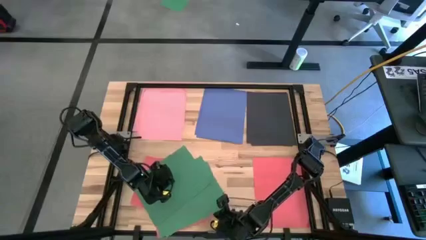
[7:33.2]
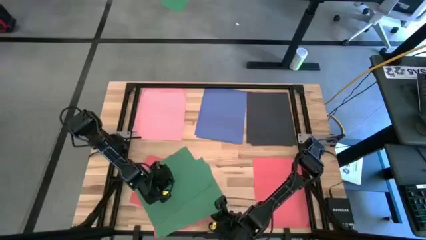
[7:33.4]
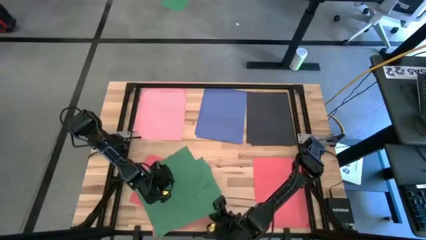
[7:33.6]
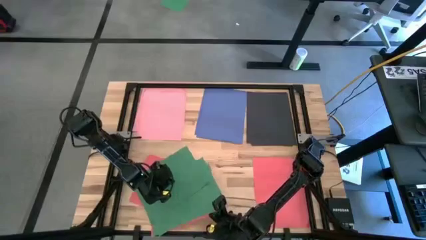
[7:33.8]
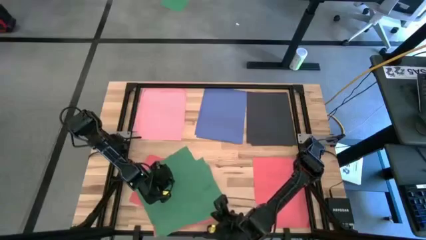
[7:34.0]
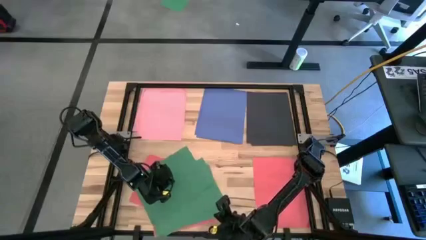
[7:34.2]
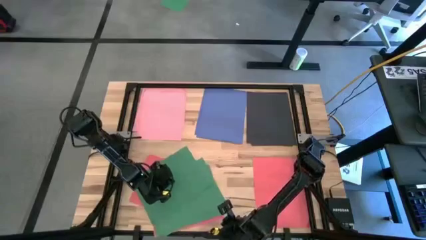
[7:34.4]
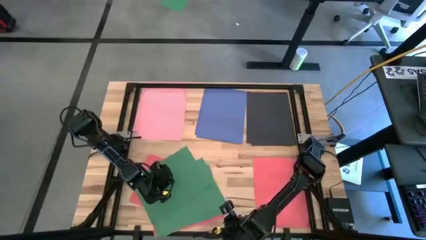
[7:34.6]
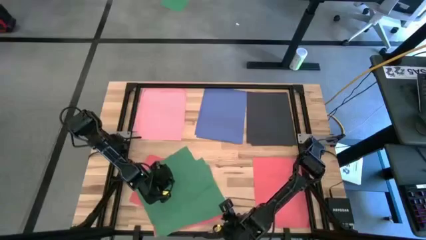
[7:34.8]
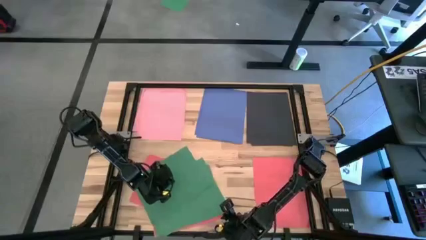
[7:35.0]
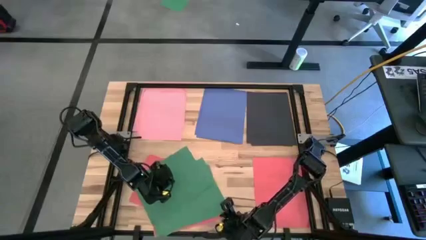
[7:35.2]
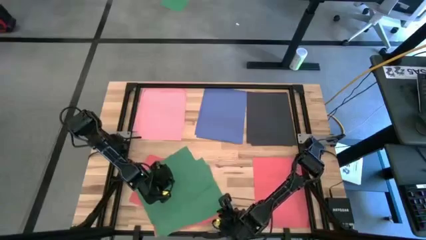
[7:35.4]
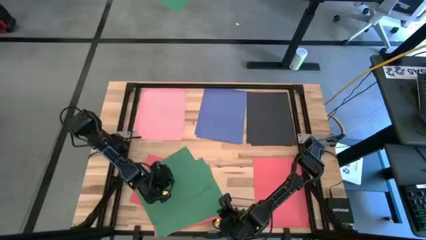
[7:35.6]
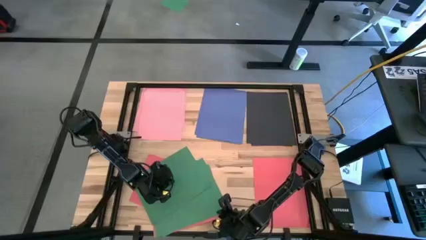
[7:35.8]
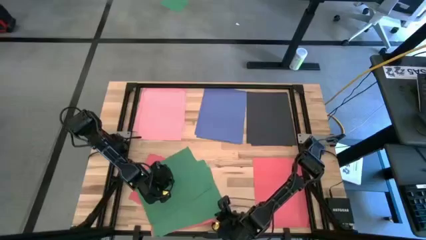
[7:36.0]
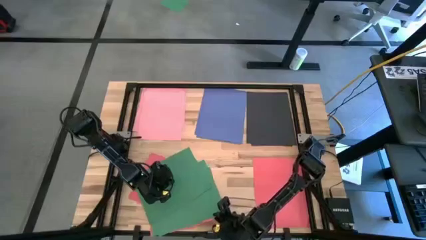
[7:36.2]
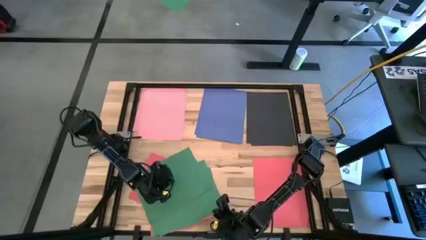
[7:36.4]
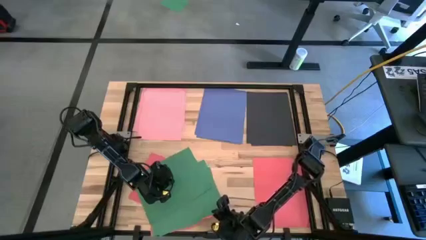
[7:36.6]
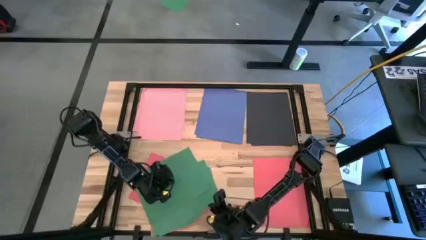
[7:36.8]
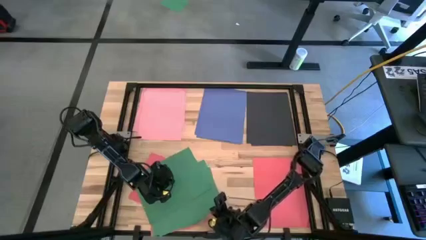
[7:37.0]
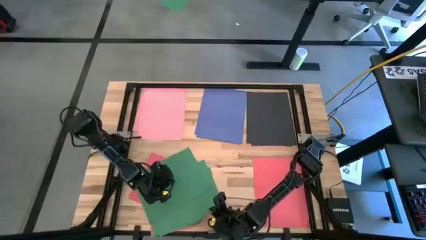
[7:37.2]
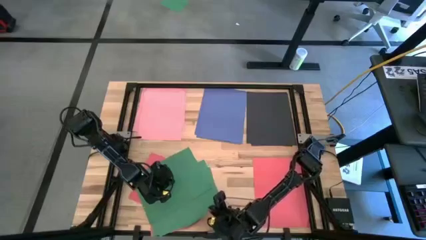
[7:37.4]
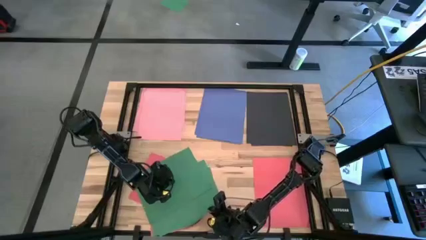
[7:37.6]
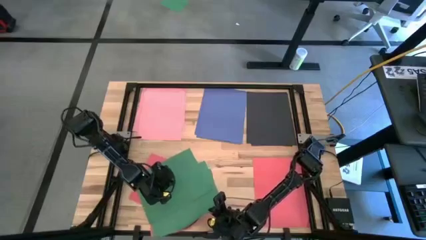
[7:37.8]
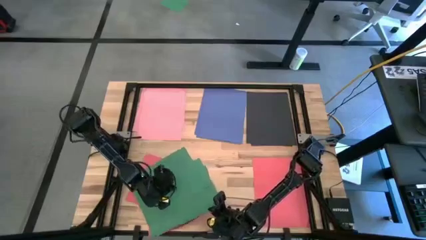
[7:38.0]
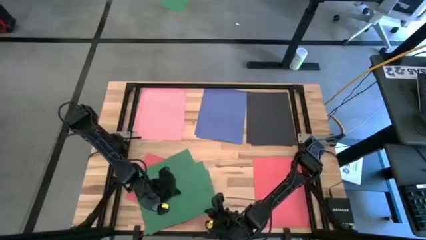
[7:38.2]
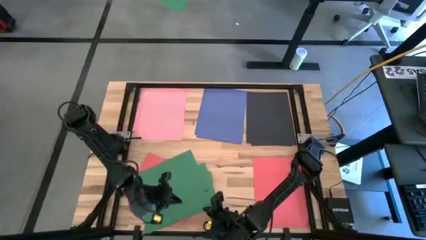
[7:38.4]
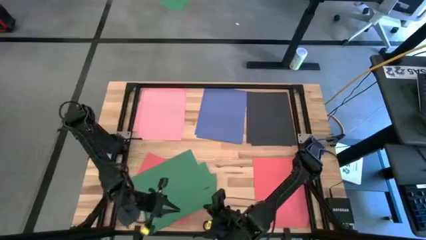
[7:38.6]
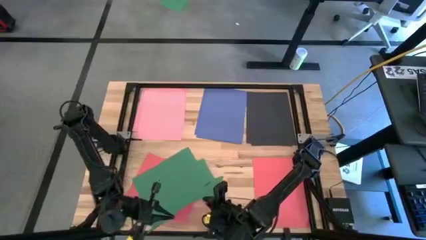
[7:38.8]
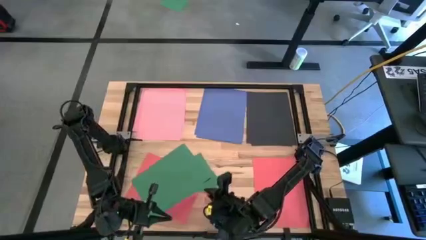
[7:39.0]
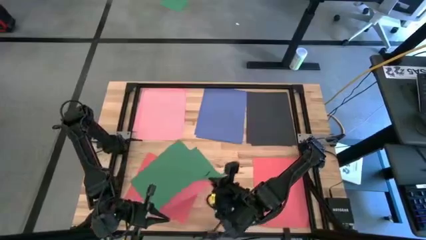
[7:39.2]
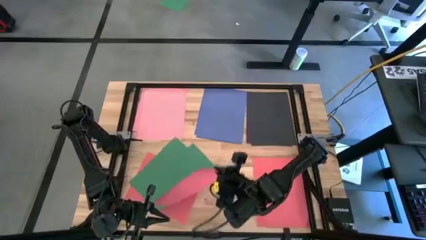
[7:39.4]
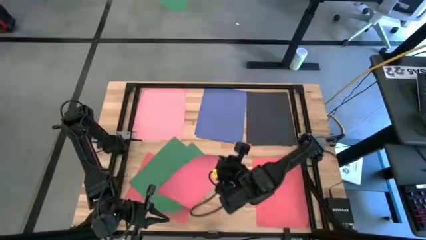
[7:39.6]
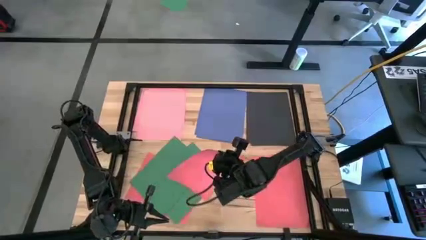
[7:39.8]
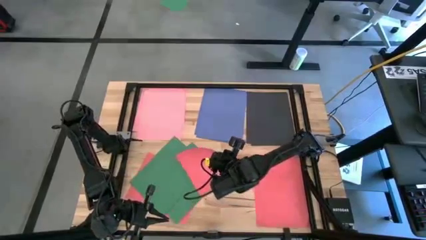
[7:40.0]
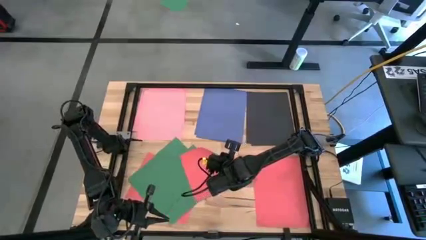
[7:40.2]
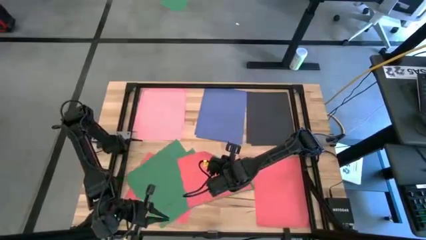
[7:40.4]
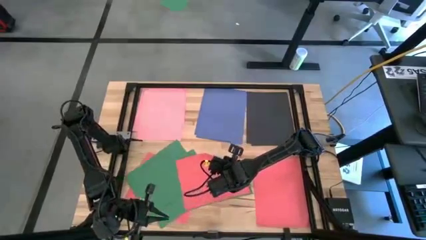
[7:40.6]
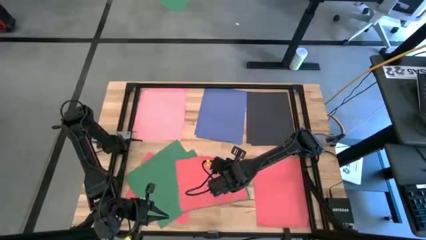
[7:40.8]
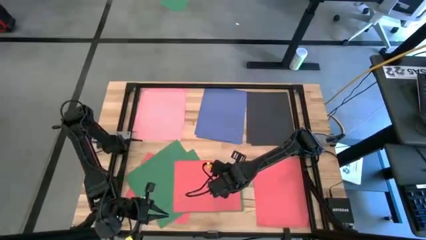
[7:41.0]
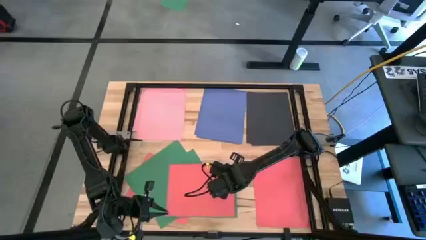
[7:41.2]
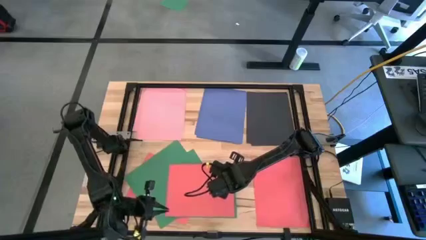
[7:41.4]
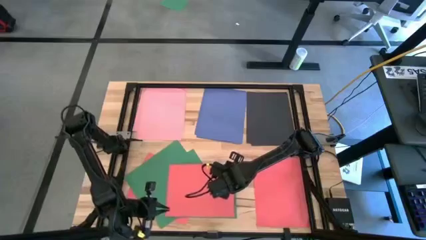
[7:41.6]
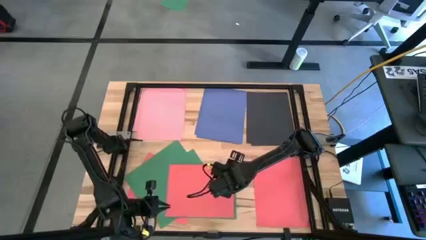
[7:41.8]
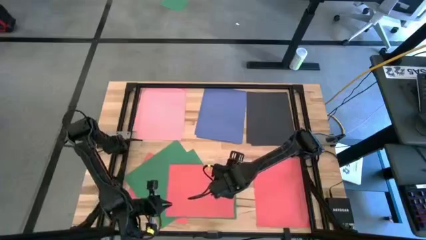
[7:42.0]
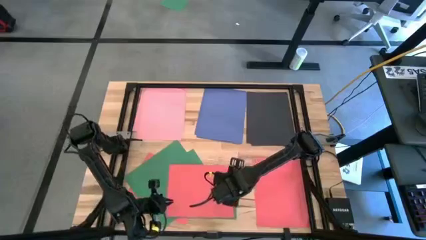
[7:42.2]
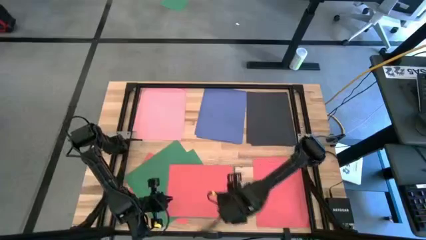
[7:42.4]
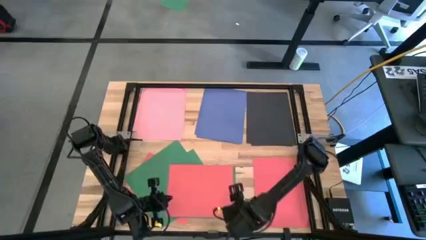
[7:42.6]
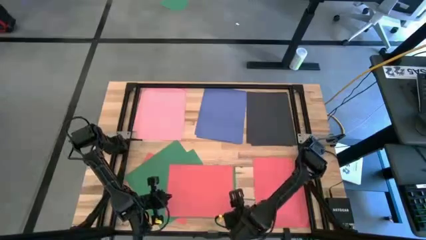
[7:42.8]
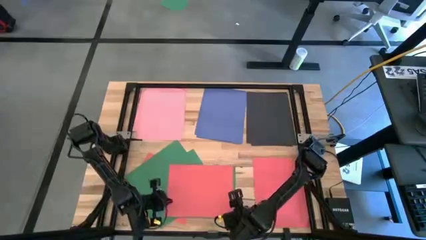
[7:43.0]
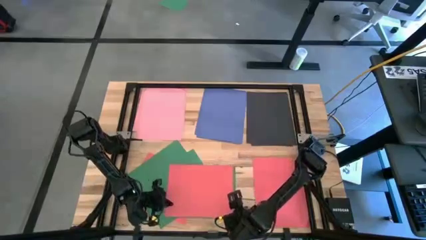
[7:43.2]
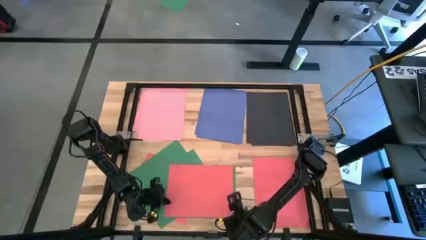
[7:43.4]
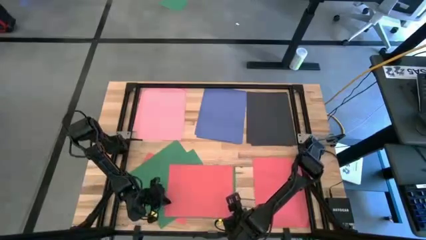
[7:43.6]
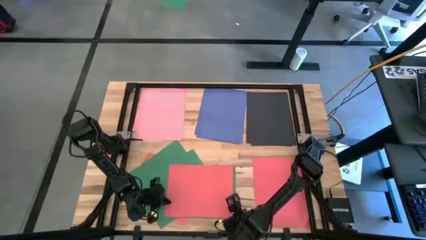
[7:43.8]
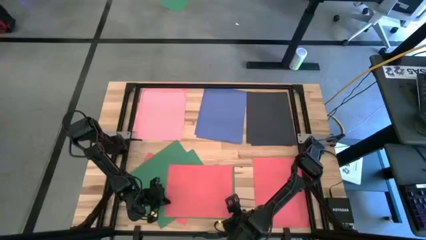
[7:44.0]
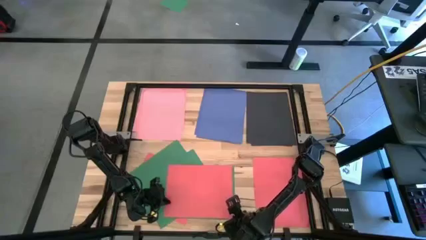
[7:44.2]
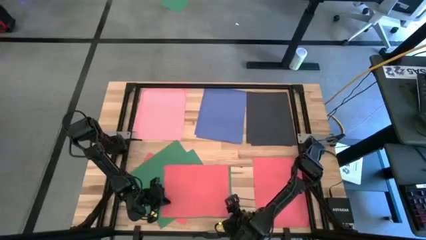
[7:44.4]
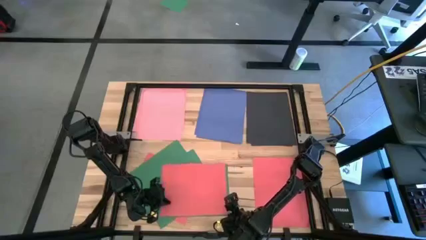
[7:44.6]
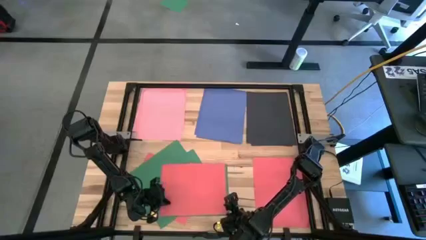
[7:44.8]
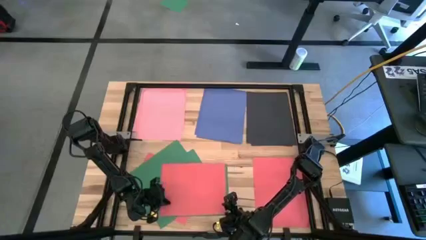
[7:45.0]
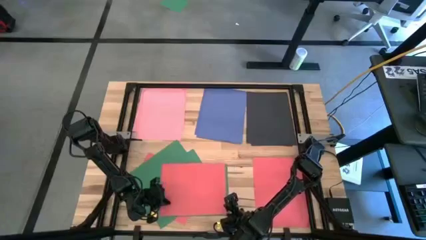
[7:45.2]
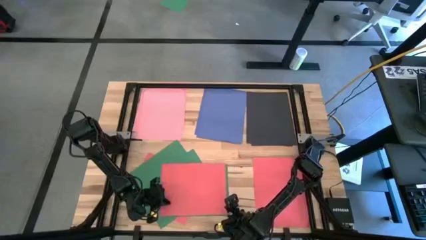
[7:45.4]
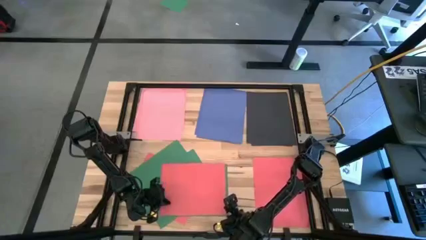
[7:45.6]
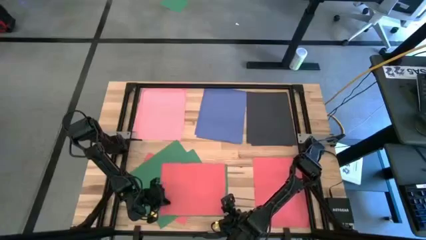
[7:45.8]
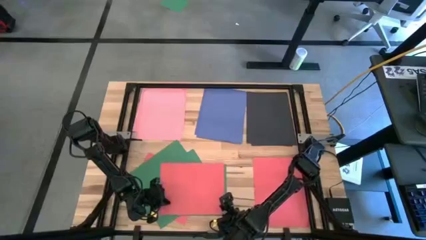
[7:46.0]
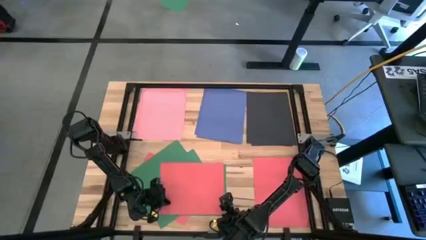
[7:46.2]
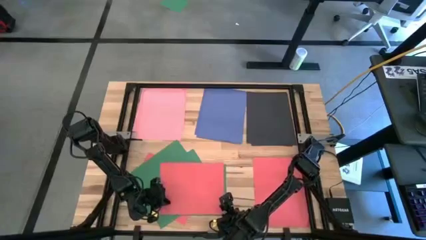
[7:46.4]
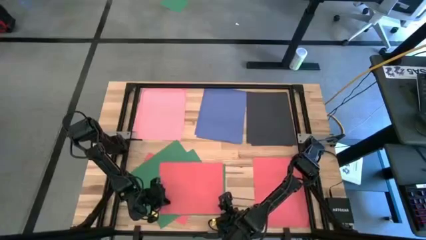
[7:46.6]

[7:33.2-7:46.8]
Task: Organize paper
Stack the red paper on top of the other red paper on the table
